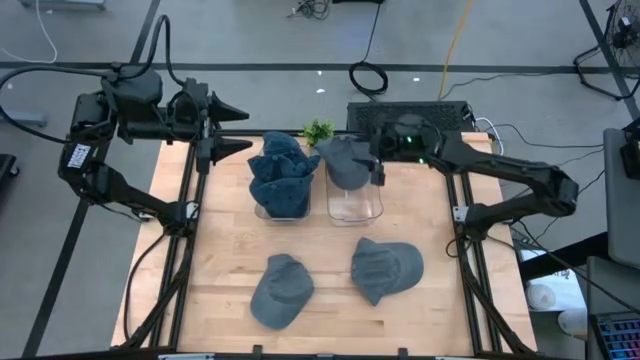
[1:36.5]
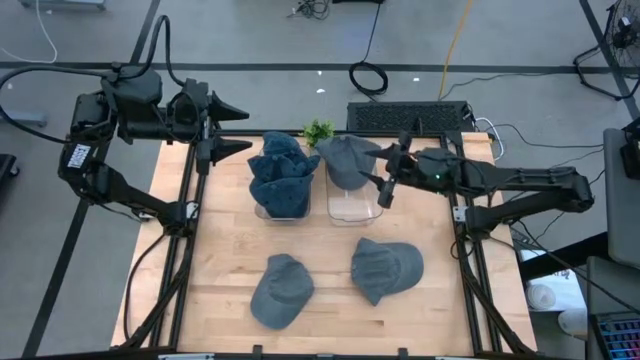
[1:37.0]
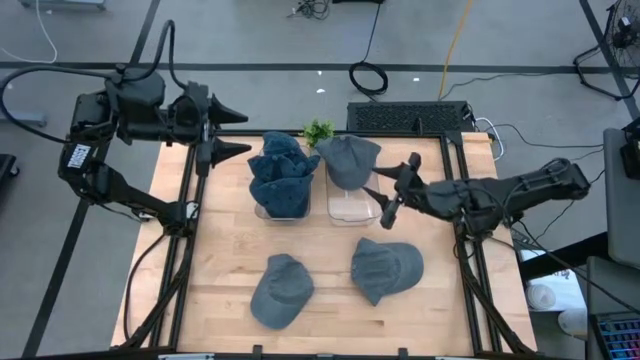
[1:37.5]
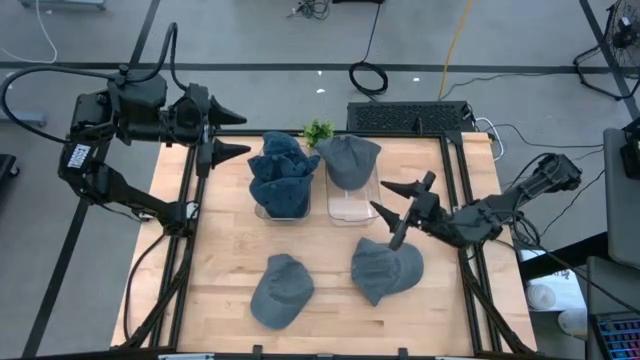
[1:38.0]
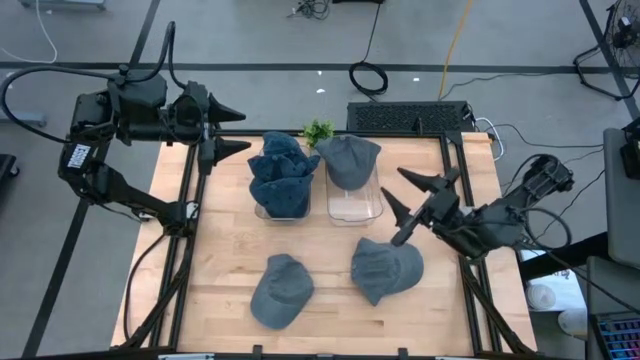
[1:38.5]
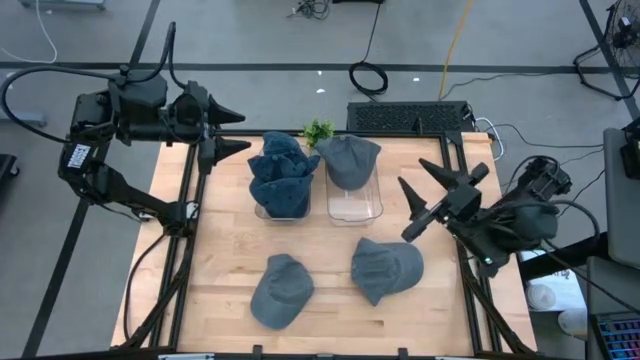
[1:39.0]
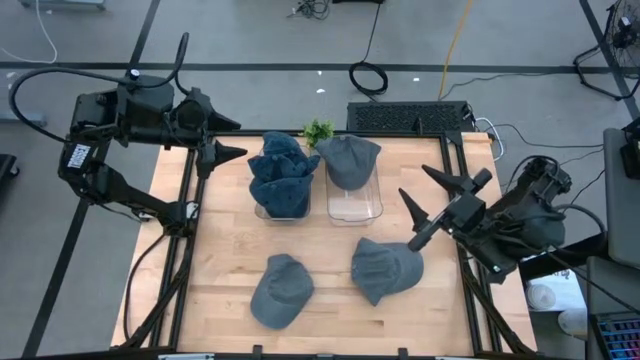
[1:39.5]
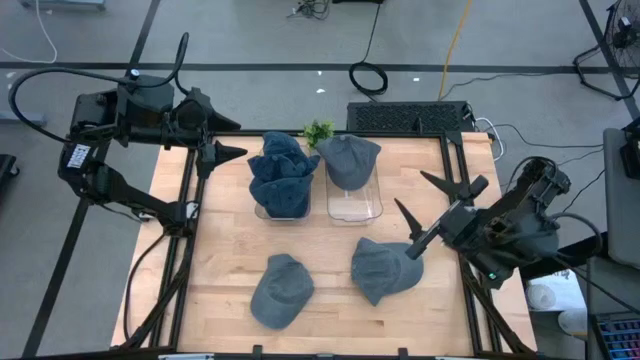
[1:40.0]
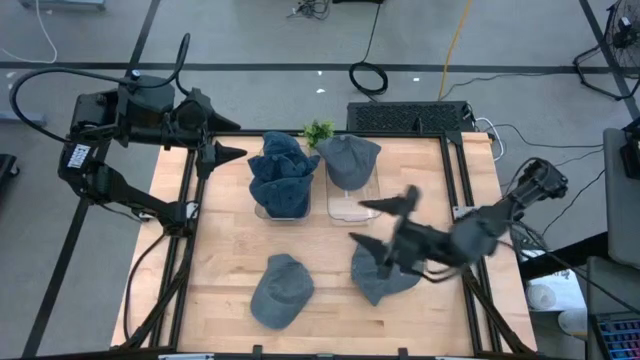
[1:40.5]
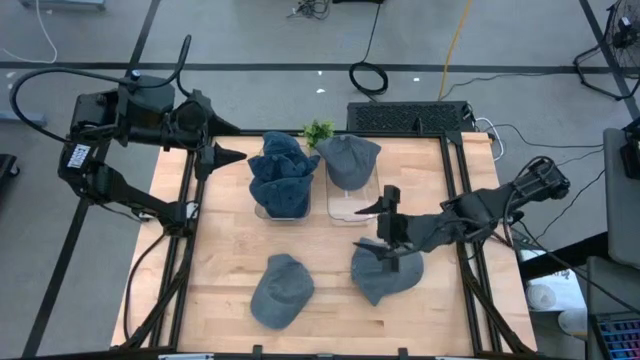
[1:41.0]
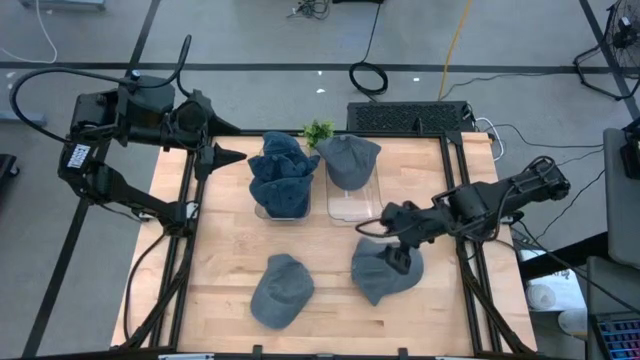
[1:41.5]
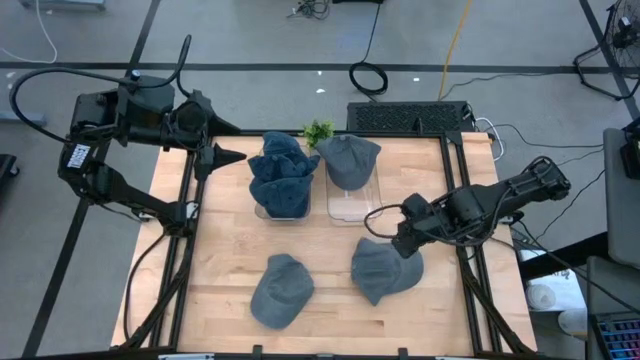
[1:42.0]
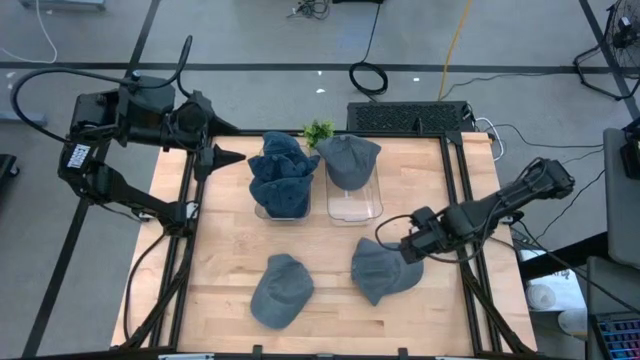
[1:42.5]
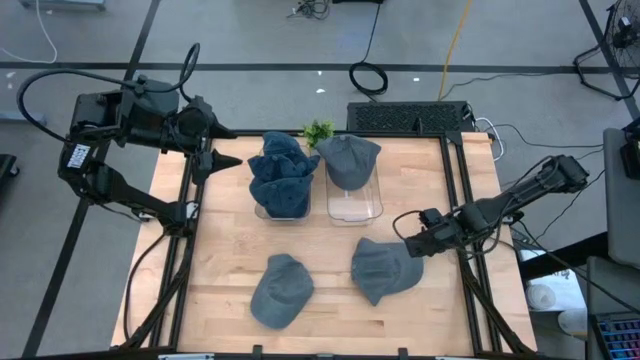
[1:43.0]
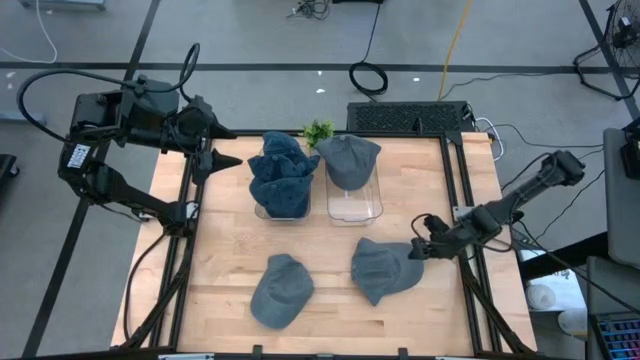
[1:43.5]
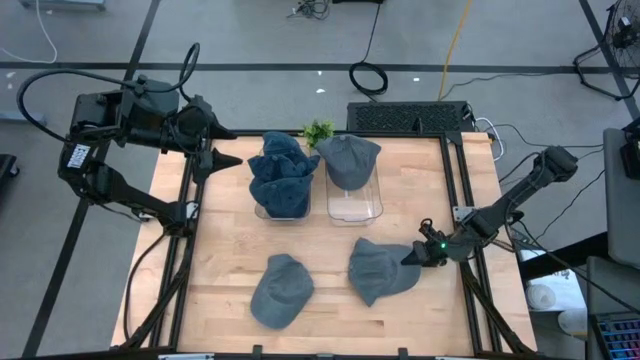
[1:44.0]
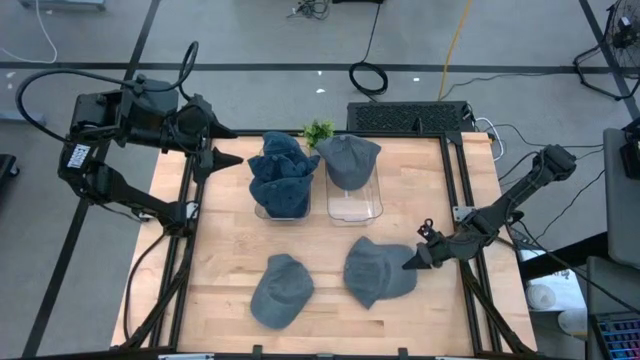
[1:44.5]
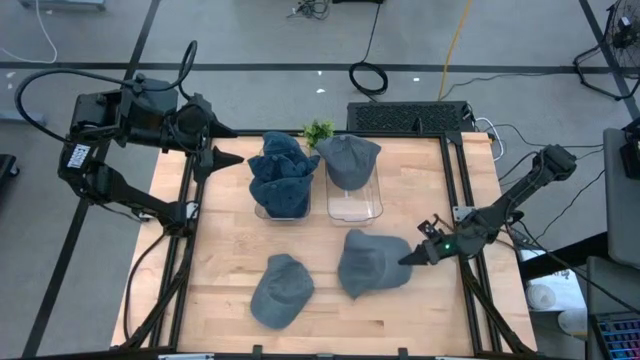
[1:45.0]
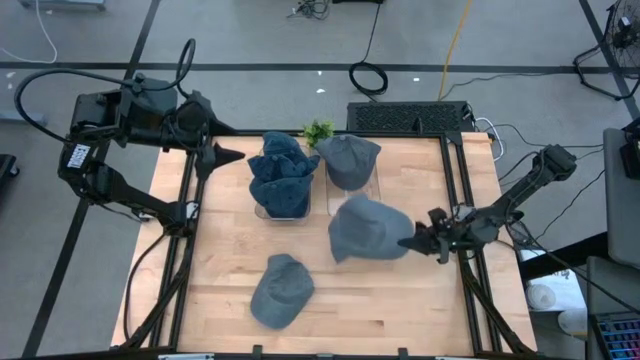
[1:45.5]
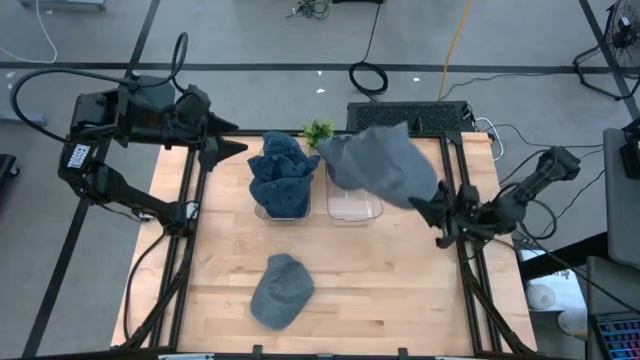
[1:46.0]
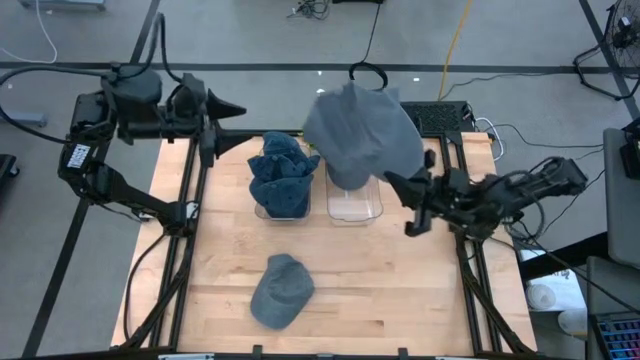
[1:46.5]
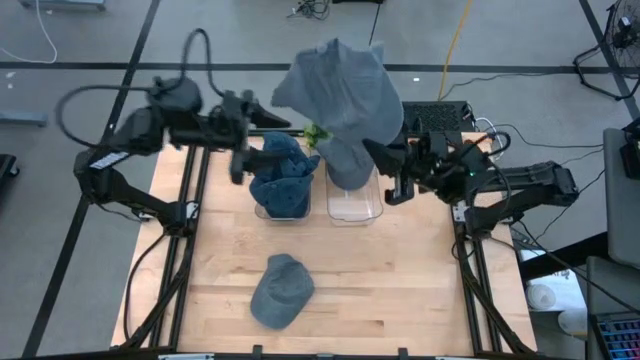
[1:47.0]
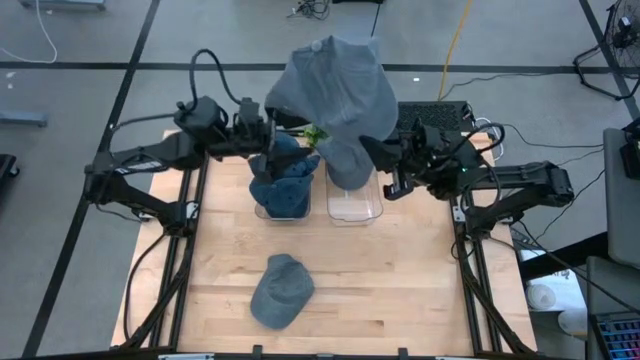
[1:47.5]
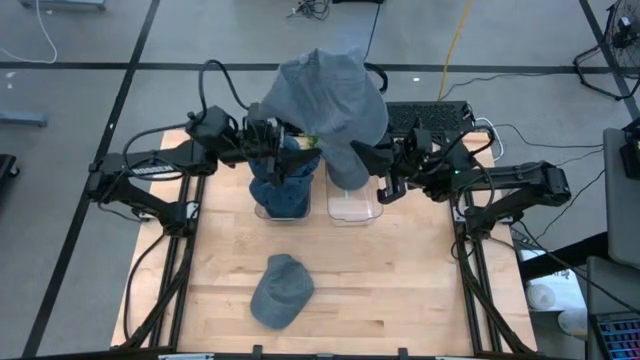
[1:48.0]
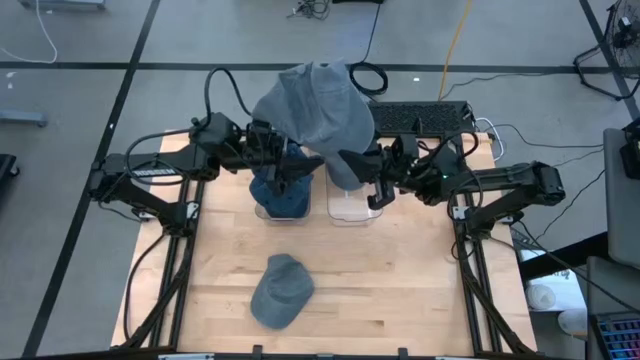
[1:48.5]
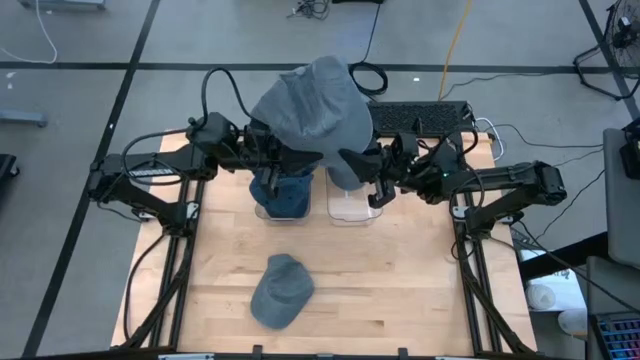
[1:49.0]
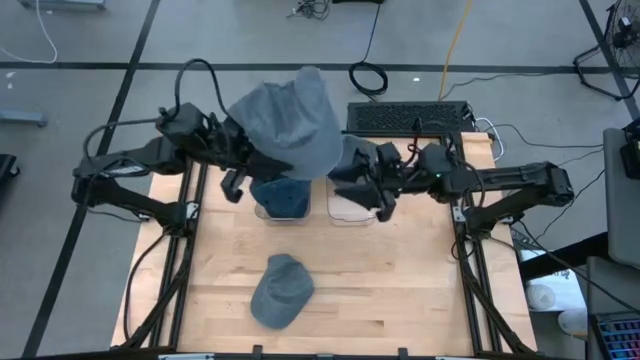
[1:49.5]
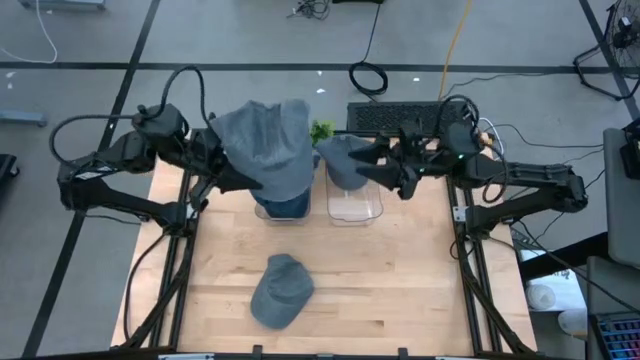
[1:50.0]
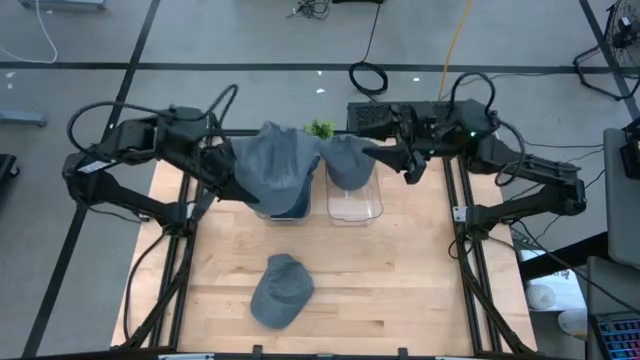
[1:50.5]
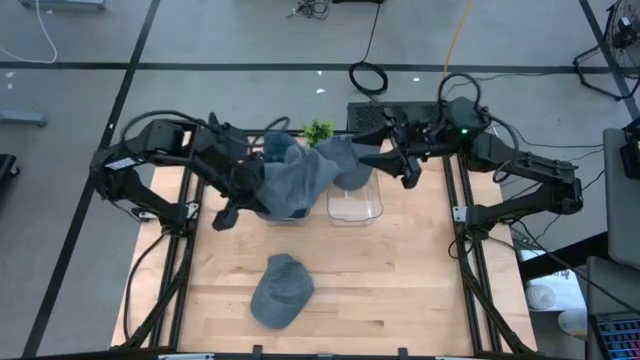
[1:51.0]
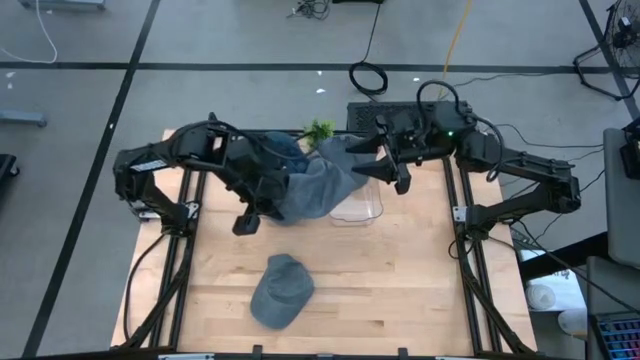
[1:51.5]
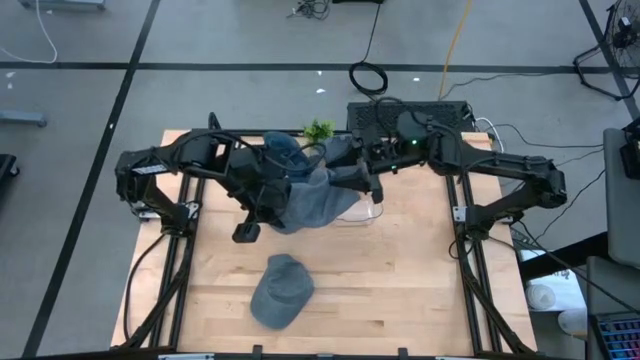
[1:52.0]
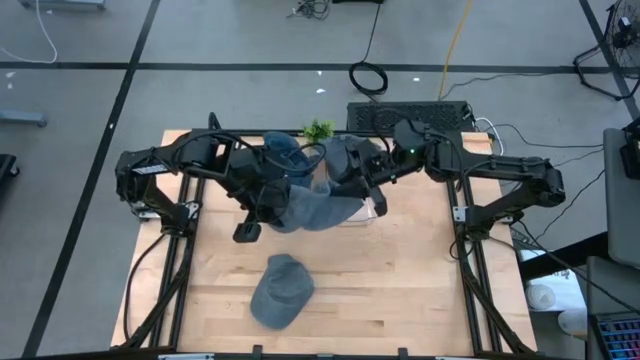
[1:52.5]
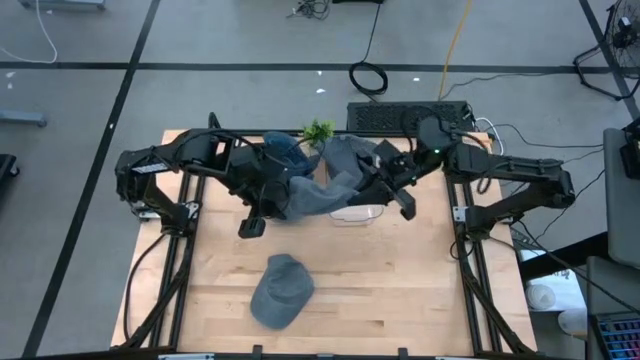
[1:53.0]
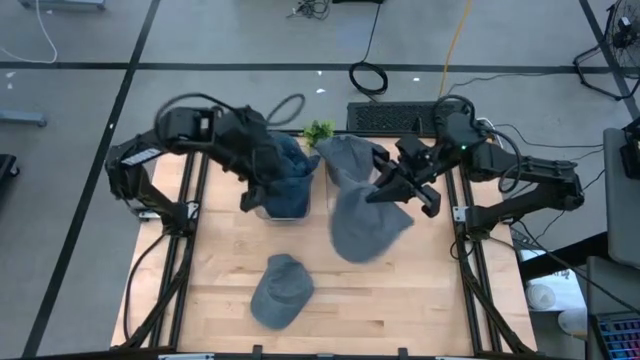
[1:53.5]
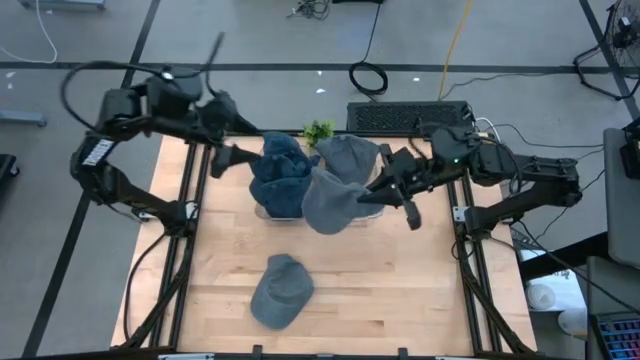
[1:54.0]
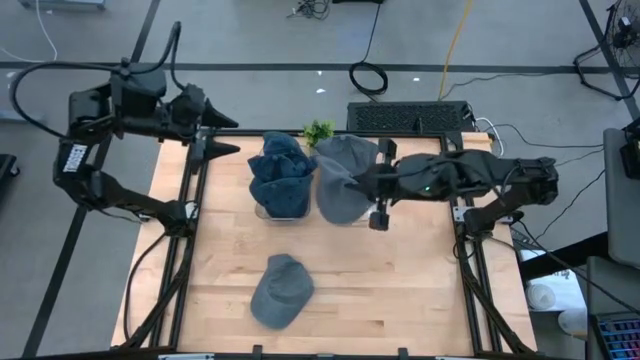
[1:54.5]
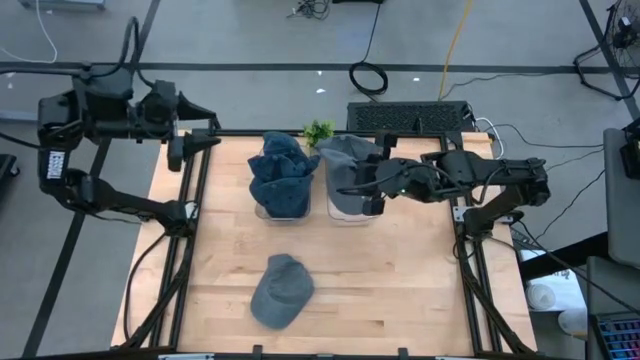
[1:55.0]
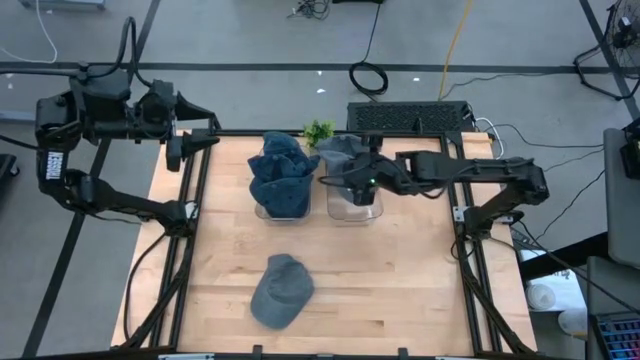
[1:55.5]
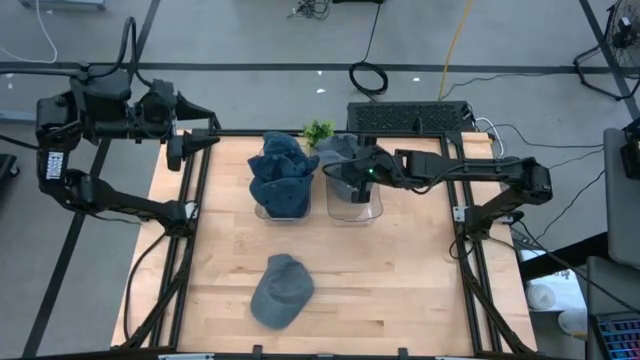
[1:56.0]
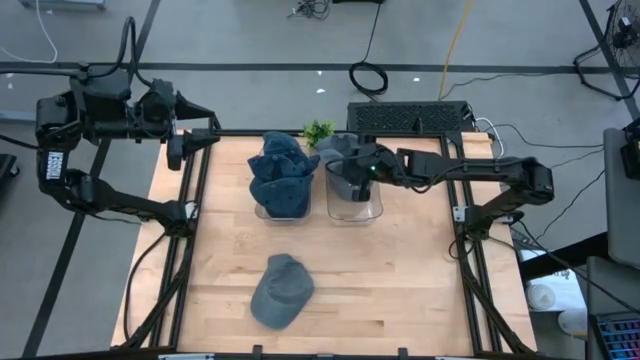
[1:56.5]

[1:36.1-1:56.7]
Task: Pick & Place hat
Put the right gray cap into the right transparent bin

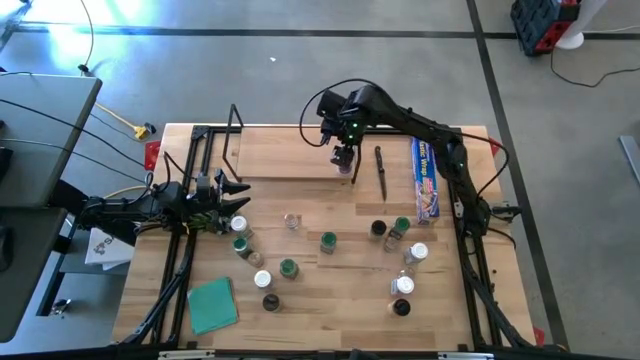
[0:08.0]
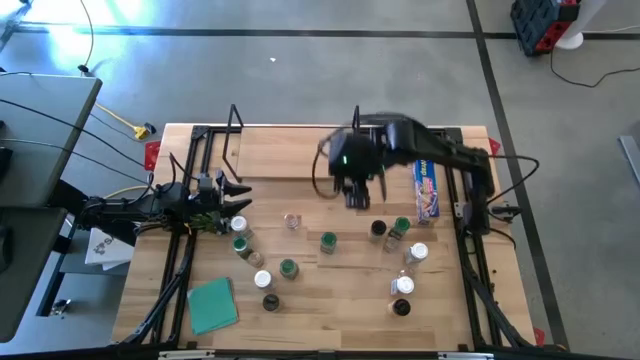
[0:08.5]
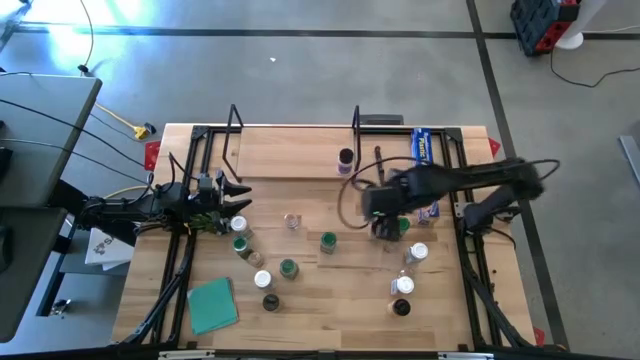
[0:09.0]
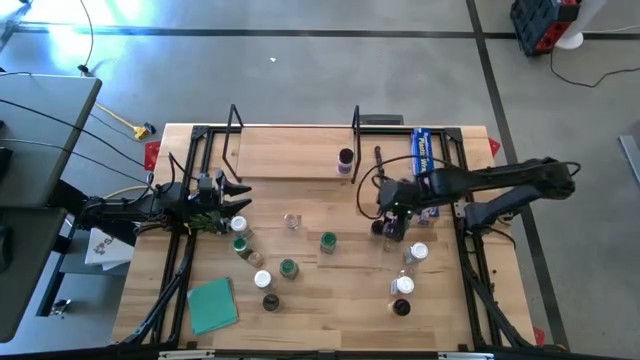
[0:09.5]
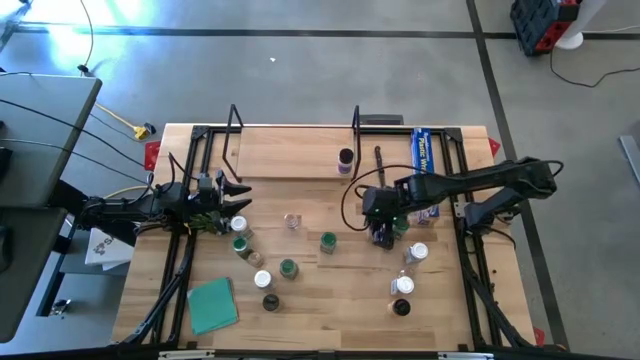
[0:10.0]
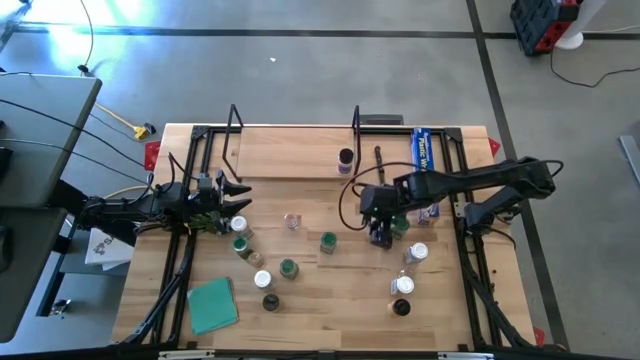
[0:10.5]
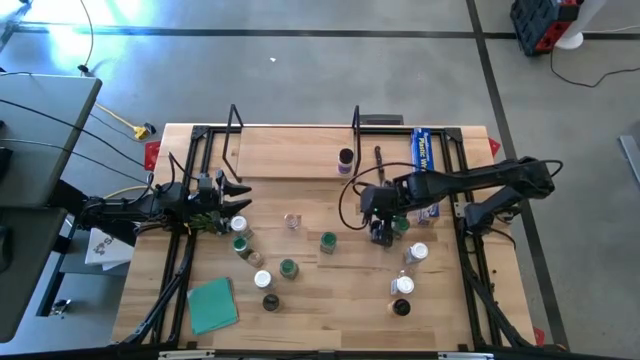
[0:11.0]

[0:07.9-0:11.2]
Task: Shelf spices
Put the black seasoning bottle on the shelf aligned with the other black seasoning bottle
